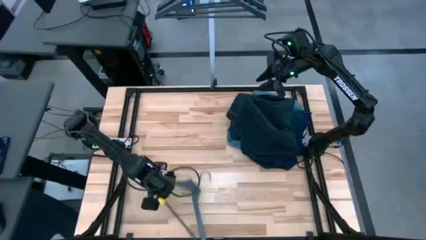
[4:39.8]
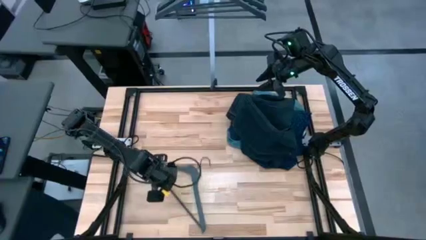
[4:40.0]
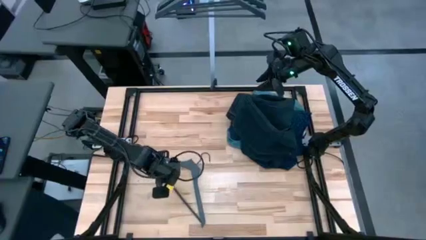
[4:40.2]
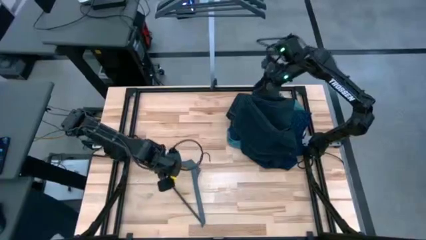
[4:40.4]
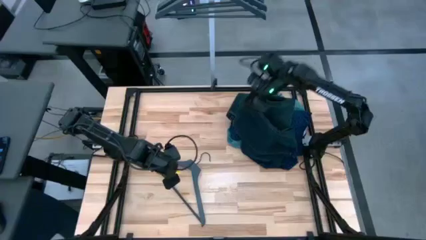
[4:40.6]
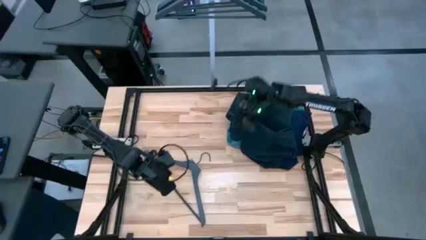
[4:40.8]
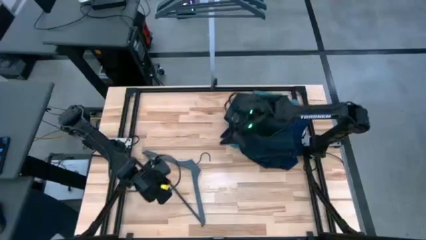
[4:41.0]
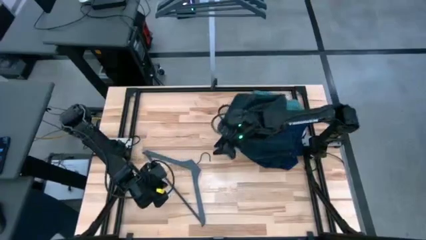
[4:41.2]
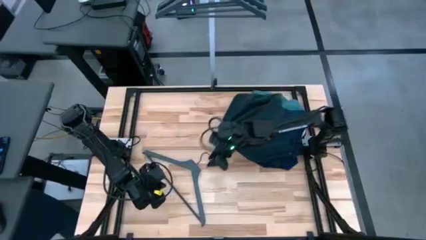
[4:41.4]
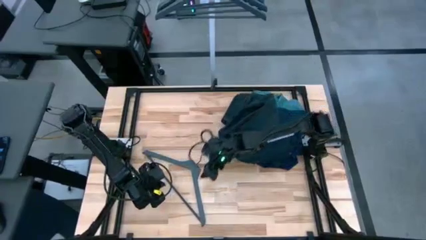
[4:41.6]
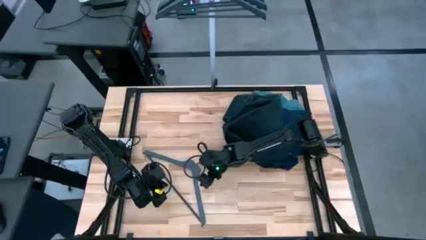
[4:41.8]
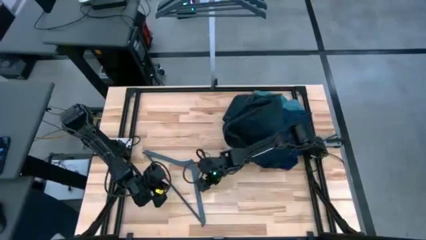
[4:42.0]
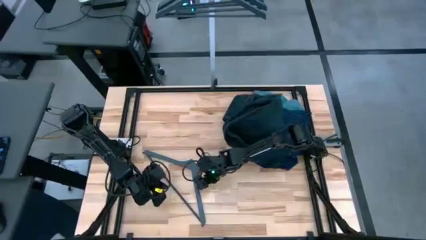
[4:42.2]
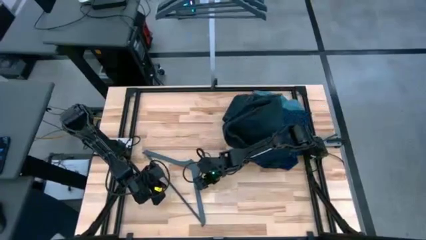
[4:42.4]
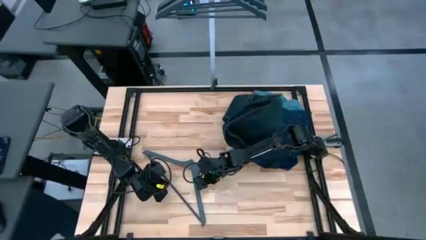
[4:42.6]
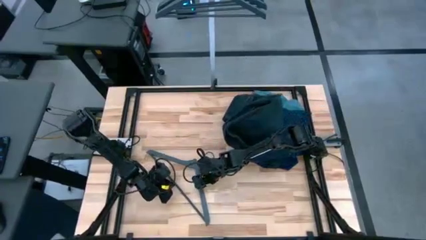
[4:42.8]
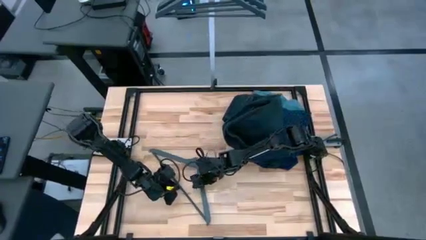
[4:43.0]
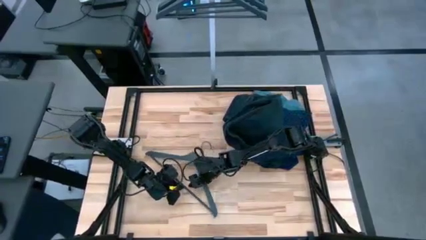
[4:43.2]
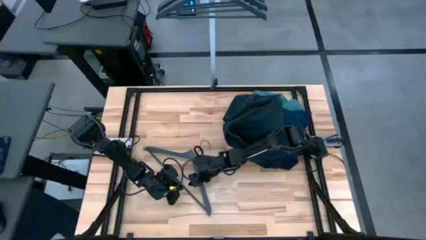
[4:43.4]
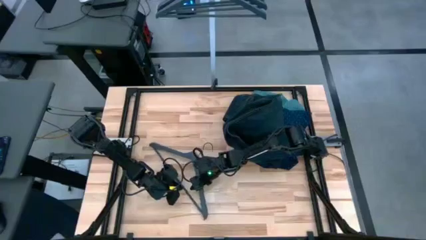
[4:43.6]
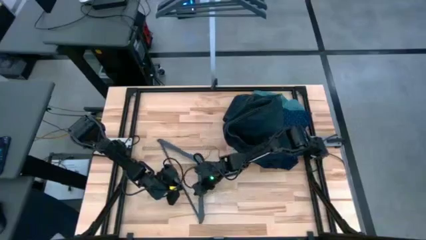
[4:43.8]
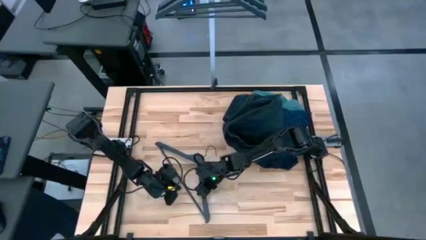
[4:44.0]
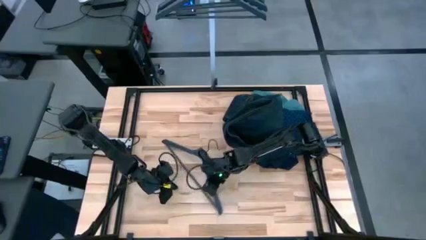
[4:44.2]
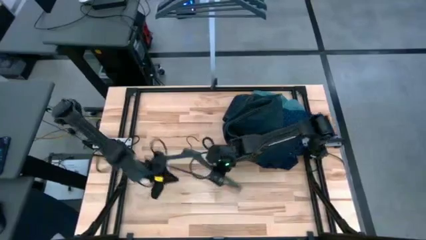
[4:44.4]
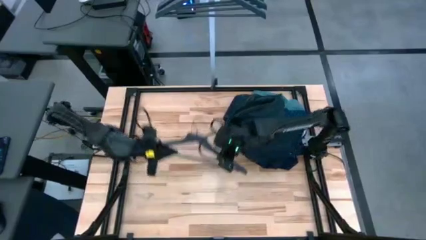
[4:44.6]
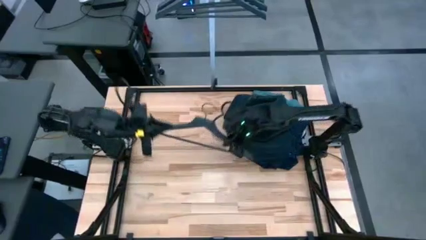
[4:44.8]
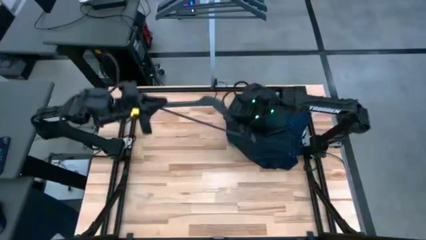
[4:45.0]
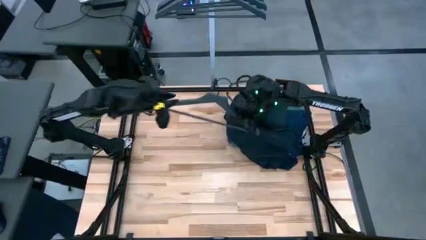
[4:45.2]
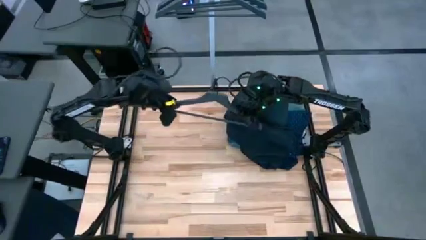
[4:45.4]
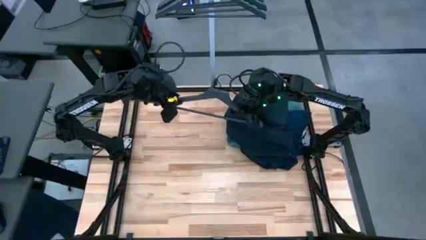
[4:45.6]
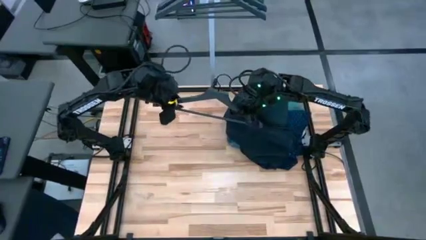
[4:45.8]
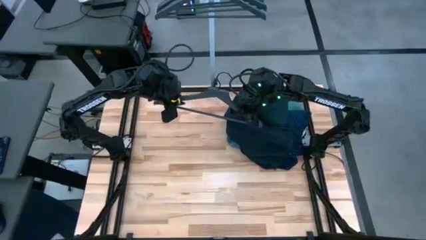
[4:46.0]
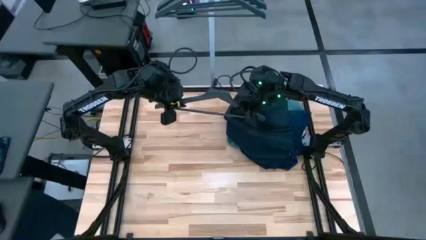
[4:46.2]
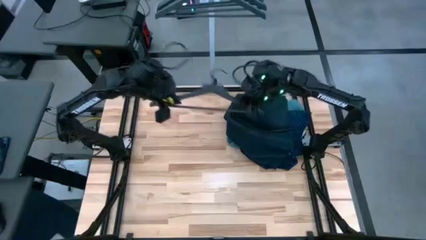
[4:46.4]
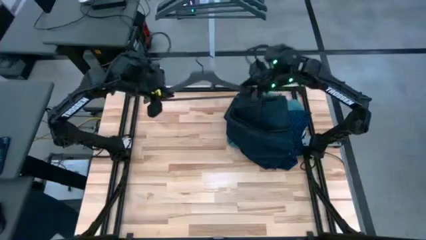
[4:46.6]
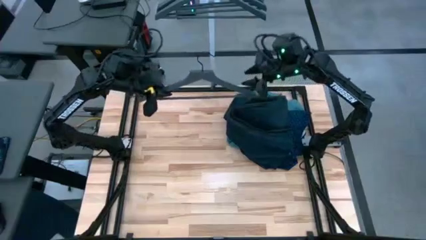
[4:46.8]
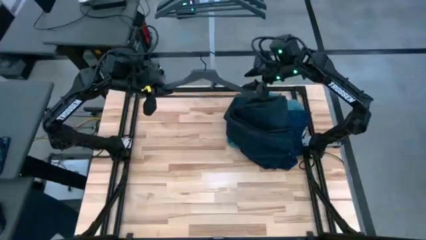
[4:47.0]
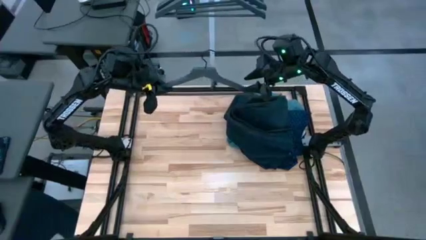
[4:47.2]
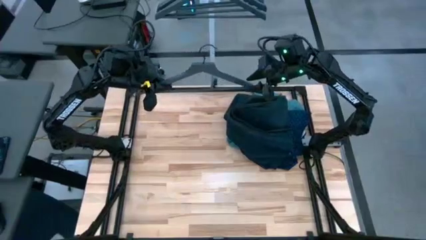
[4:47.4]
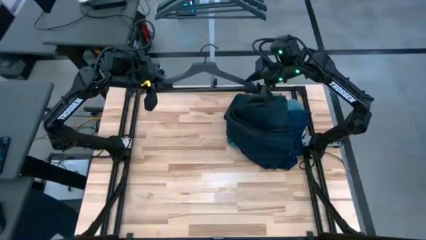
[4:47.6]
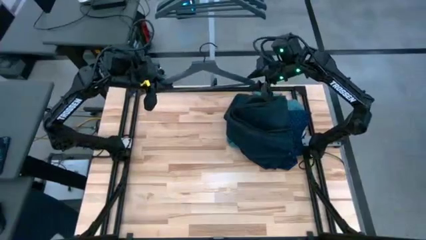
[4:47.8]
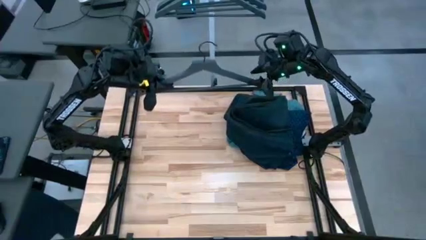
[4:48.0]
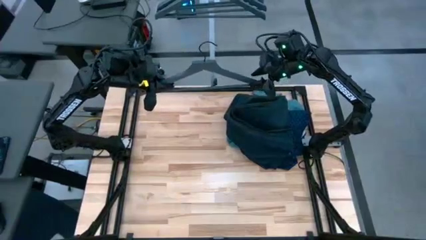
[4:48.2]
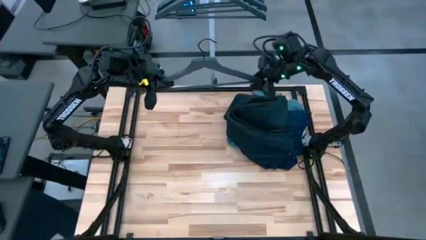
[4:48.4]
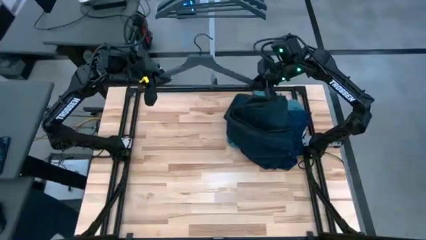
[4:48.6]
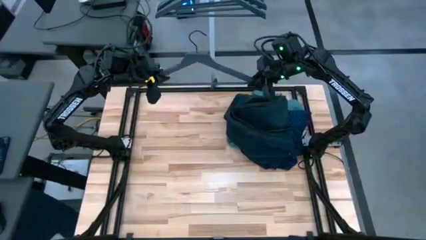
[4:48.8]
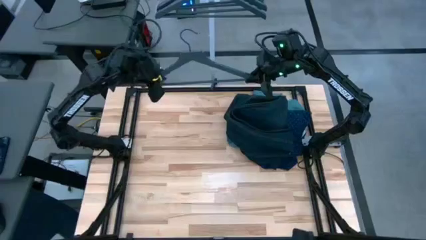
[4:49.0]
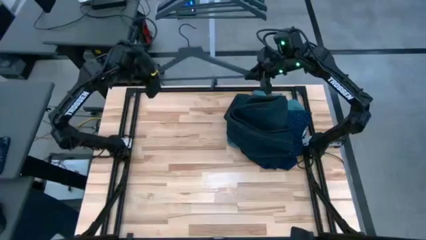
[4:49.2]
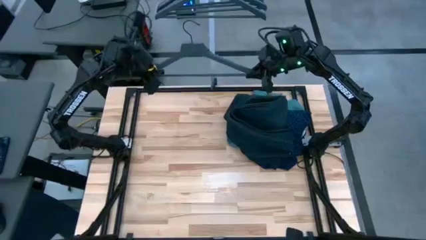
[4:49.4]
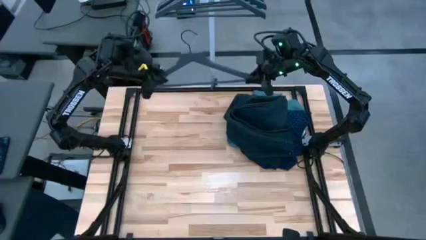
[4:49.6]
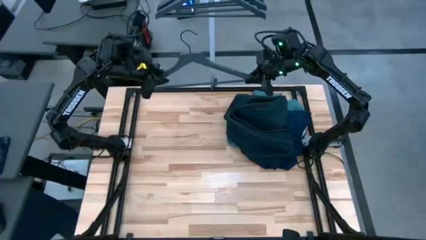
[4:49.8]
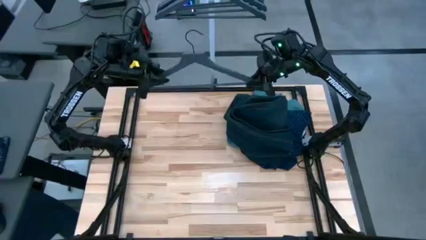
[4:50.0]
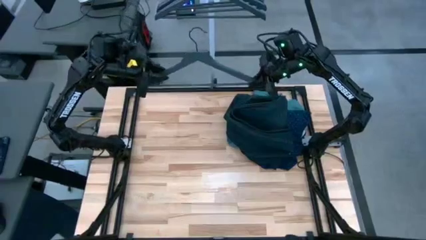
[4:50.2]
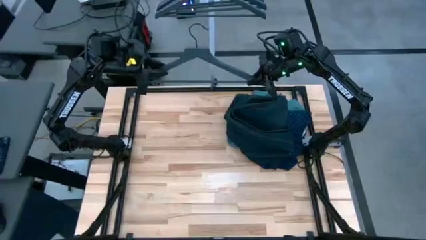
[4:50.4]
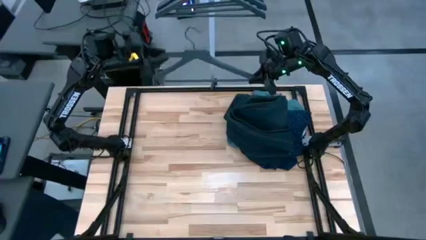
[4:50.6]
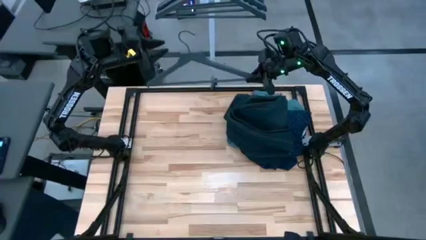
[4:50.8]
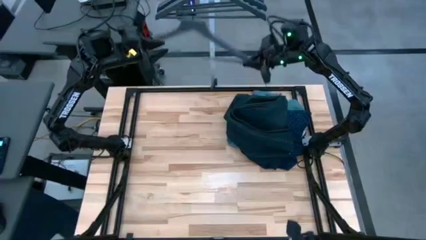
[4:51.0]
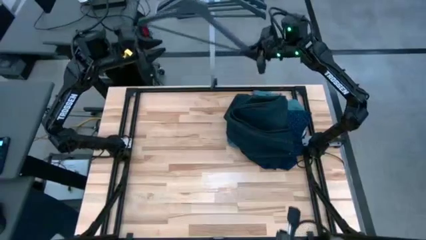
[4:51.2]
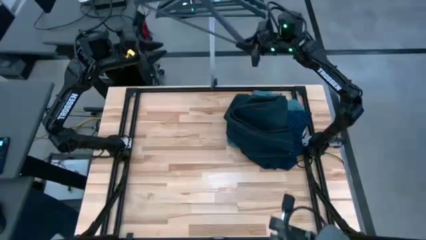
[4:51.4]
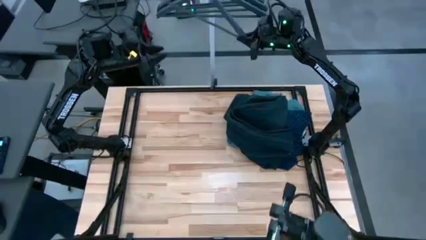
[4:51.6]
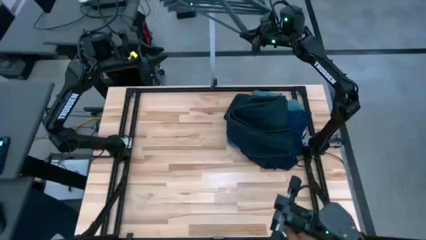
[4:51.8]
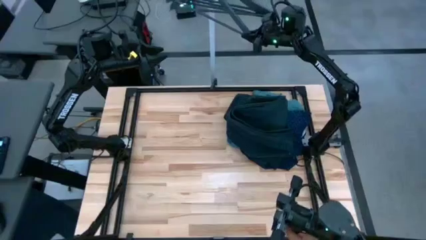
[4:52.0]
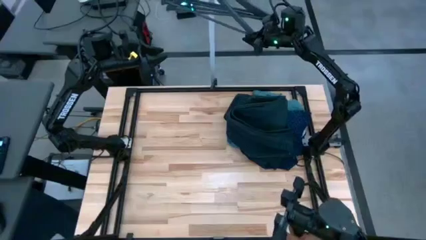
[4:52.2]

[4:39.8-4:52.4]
Task: Hang clothes
Hang the gray hanger on the rack

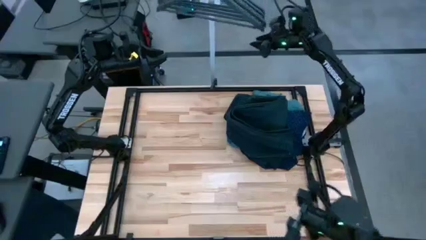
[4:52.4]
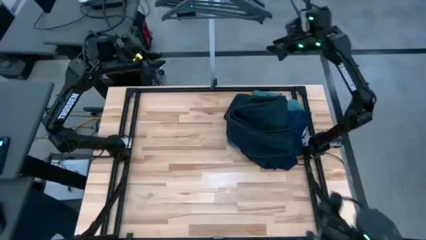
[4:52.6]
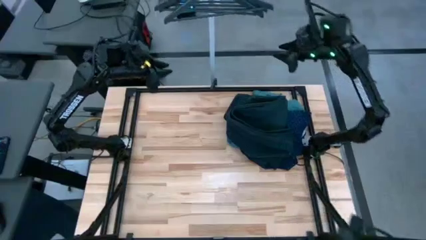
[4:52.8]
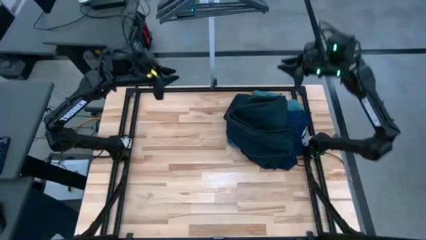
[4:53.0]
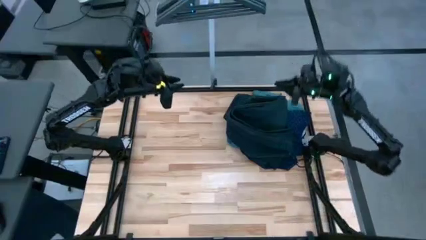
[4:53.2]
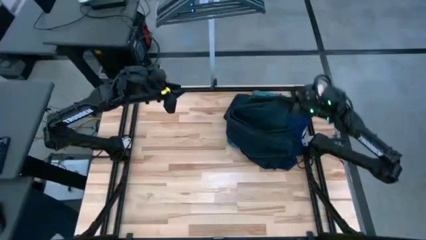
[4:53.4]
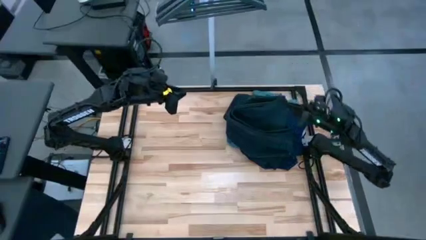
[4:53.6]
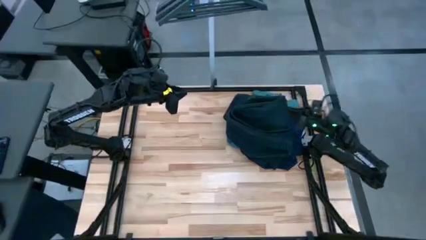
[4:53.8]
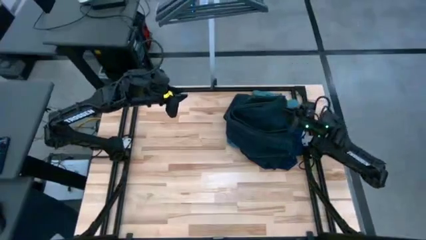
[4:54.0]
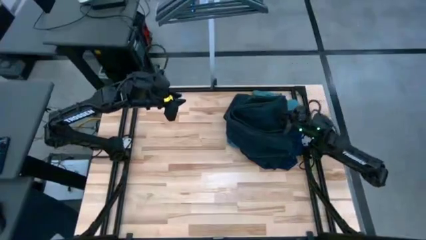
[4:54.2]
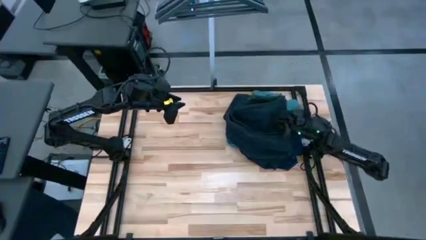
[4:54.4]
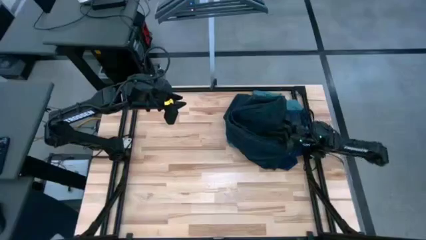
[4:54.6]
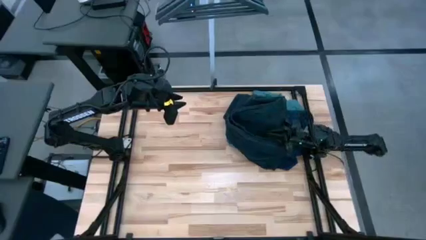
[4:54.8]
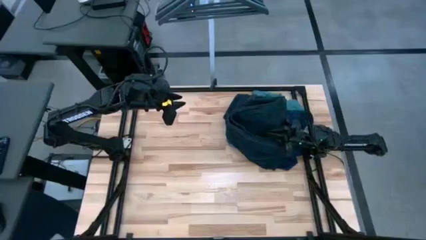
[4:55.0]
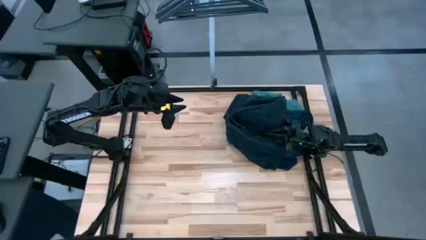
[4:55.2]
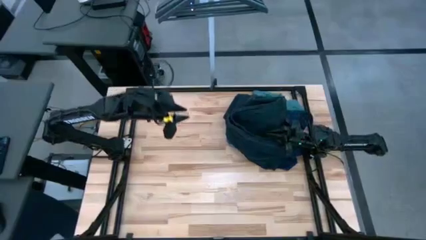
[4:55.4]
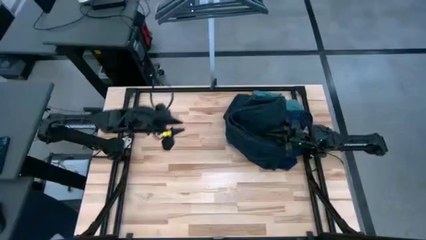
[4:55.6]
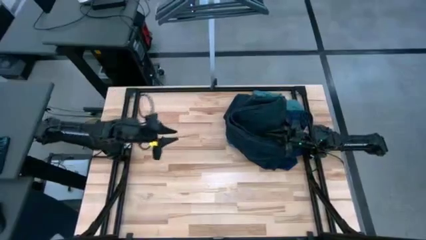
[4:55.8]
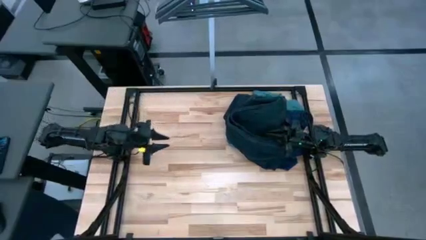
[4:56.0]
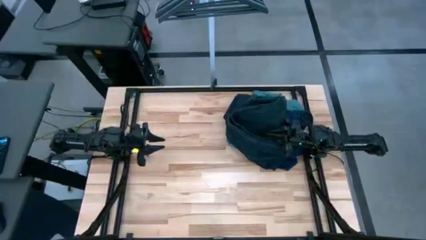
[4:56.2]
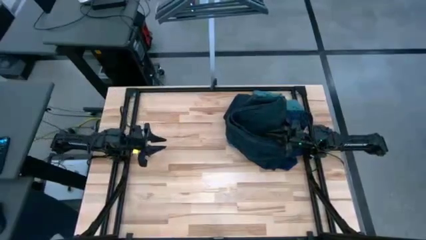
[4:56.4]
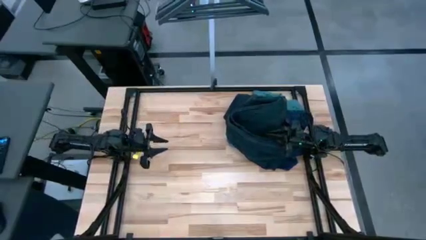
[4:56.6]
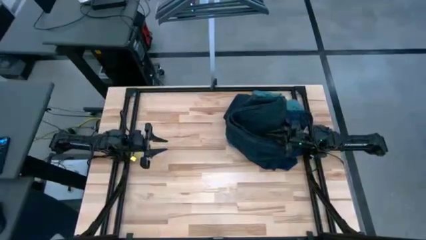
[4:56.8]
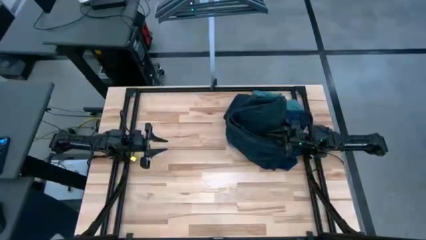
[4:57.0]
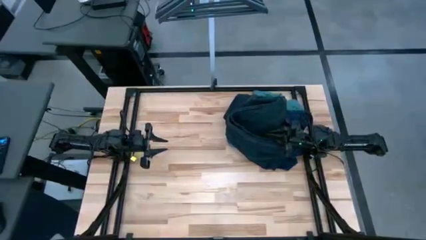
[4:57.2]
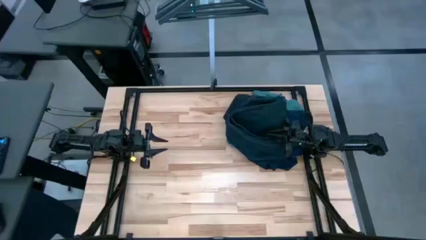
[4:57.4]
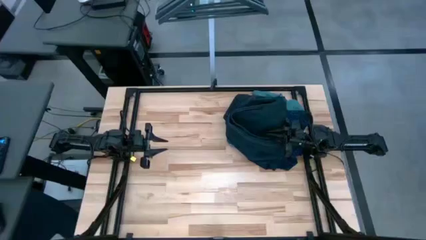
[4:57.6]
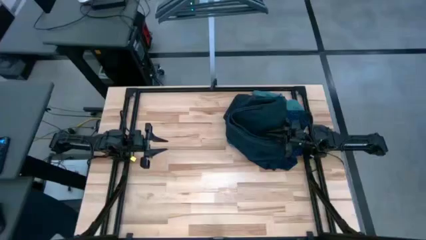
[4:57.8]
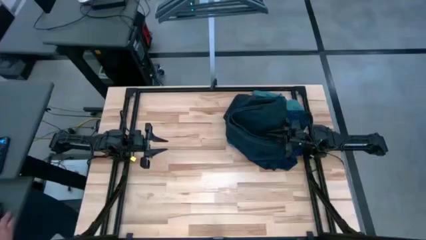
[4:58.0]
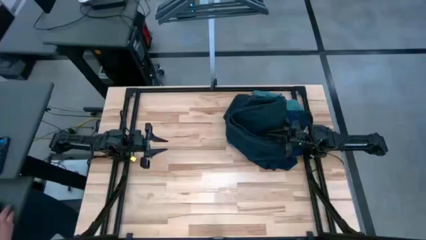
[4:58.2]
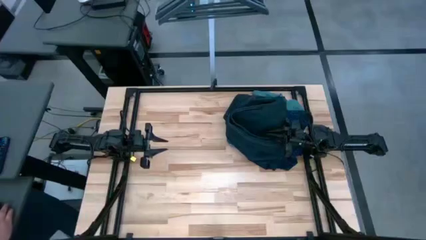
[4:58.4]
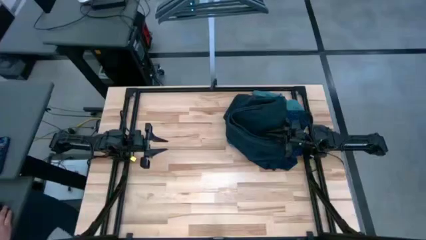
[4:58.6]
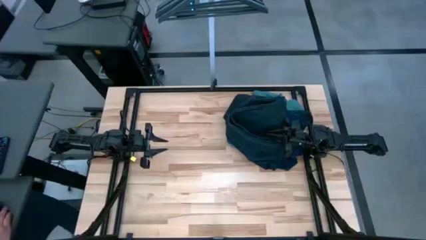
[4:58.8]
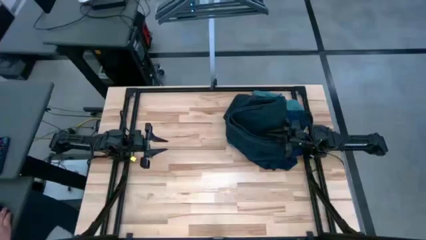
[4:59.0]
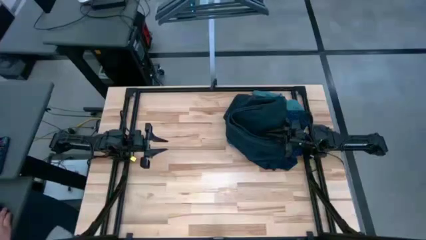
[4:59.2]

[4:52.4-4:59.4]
Return to Home Position
